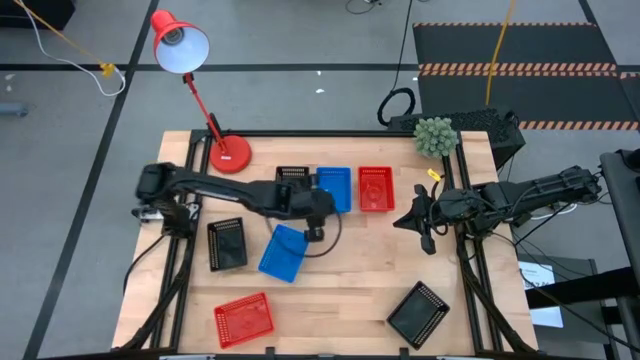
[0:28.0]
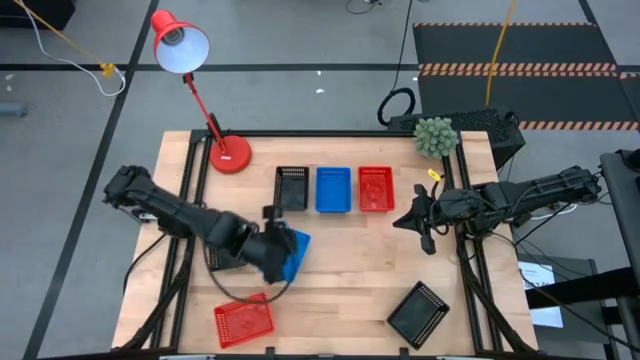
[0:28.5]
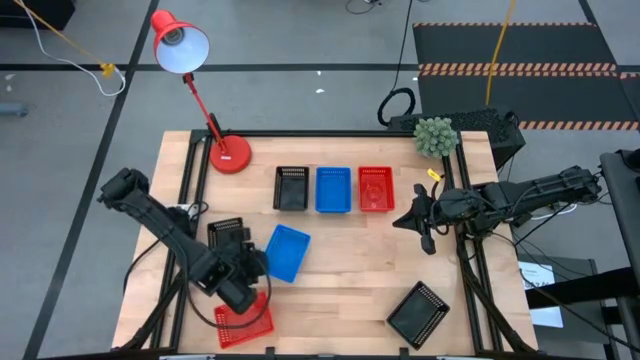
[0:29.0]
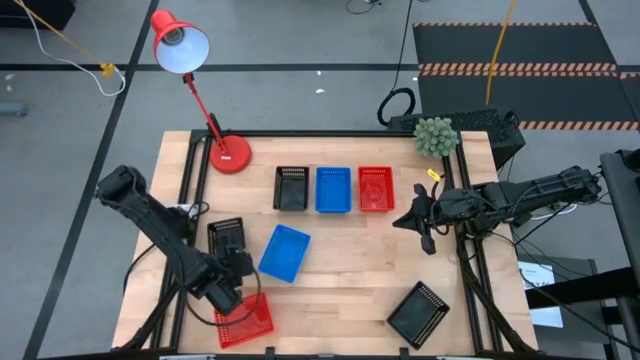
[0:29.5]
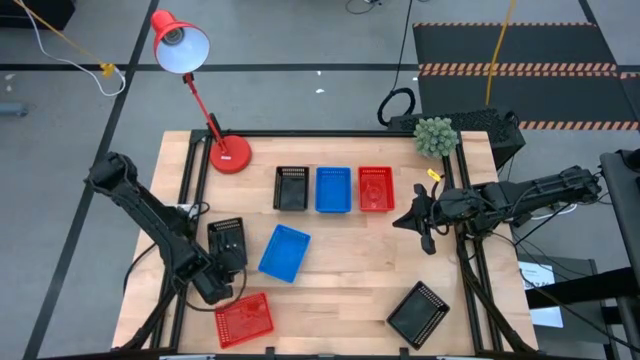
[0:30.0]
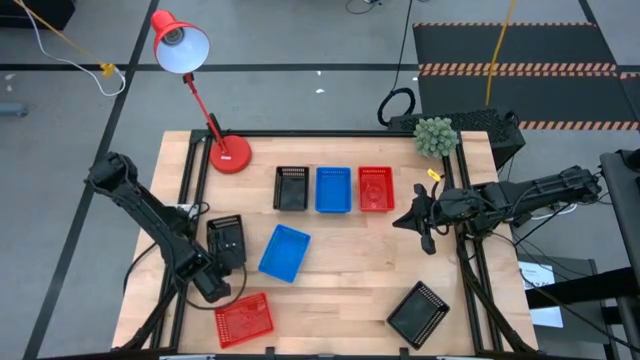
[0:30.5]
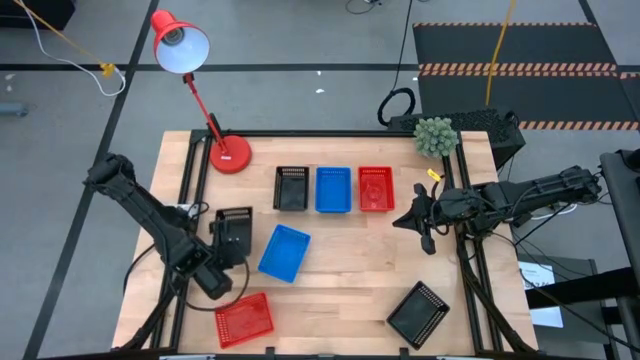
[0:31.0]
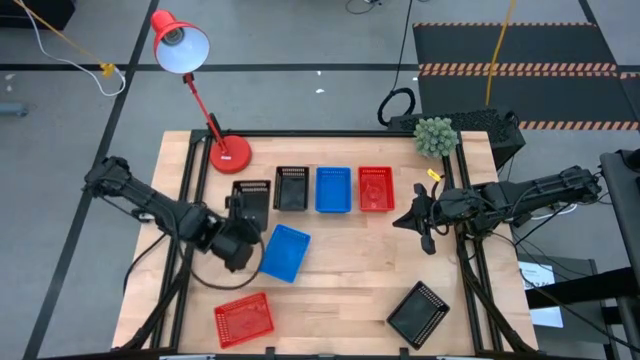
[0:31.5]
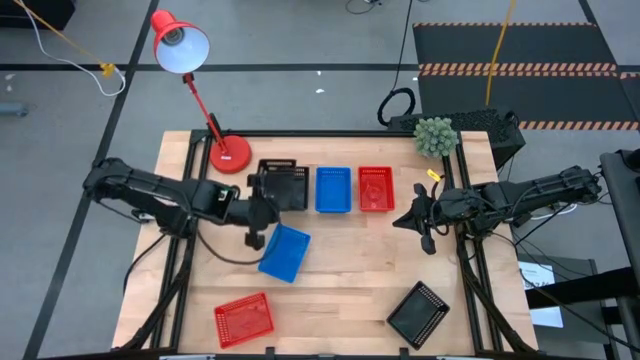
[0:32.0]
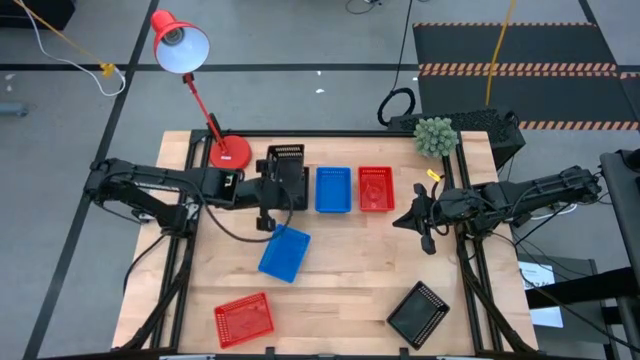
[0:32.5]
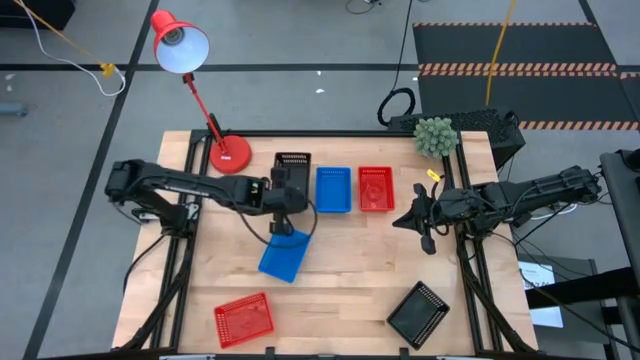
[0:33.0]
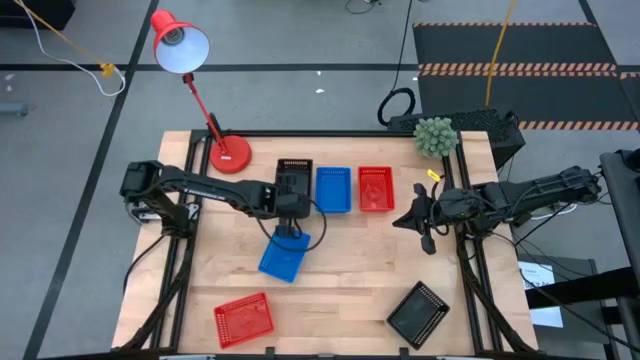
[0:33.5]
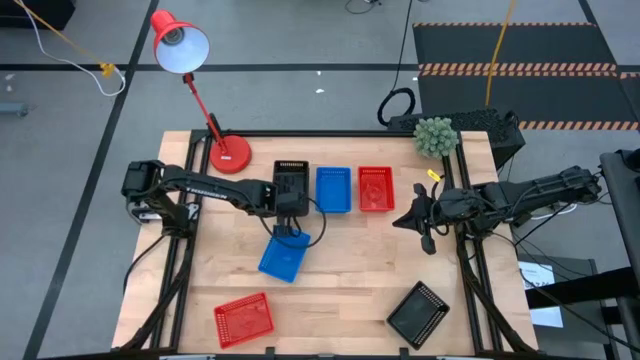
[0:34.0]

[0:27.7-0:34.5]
Stack the top black bin on the top black bin

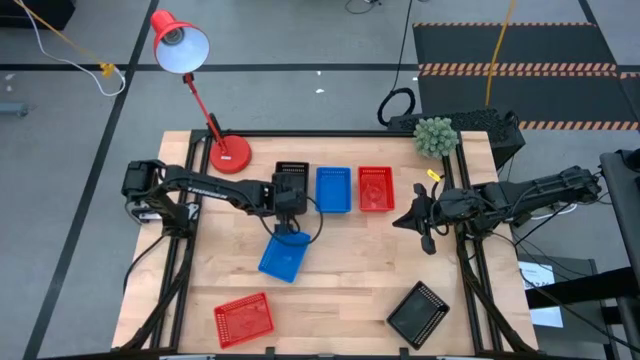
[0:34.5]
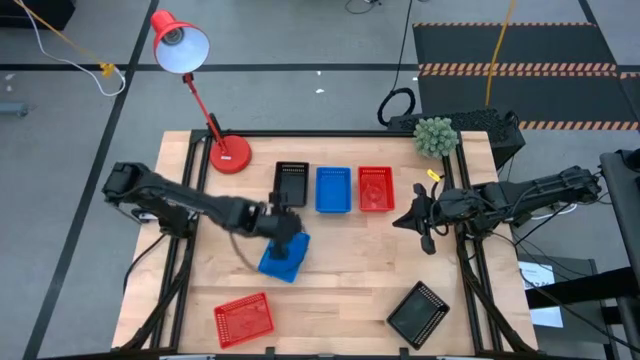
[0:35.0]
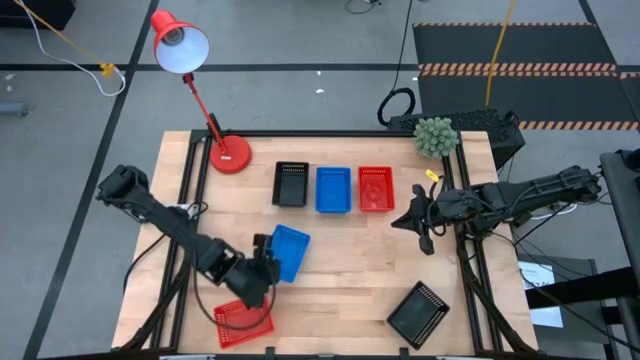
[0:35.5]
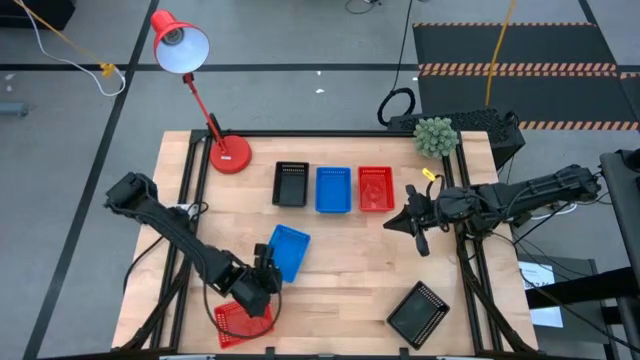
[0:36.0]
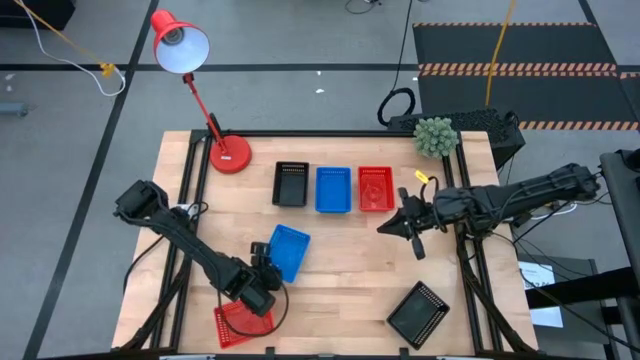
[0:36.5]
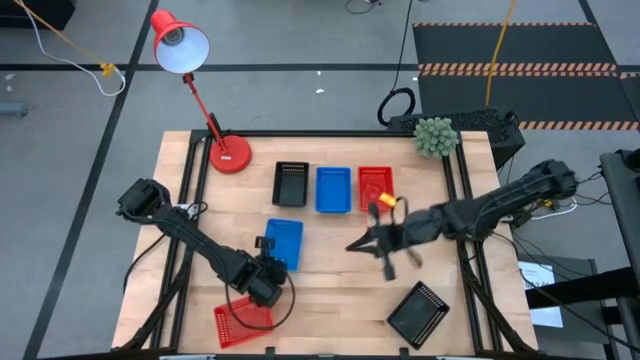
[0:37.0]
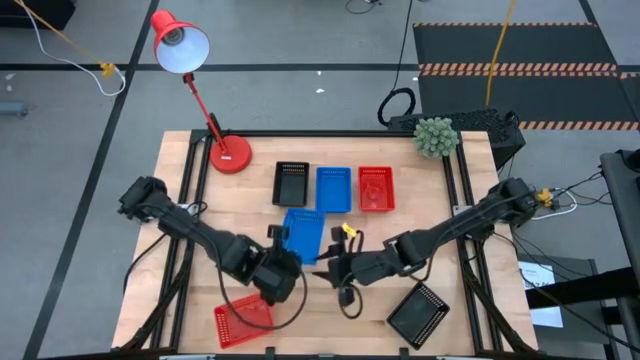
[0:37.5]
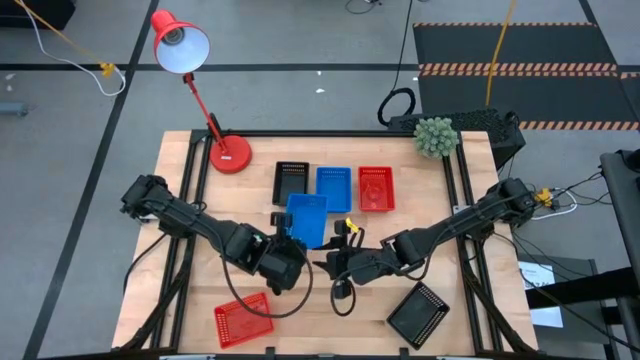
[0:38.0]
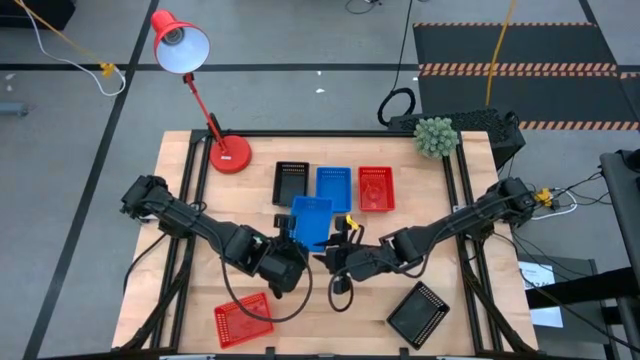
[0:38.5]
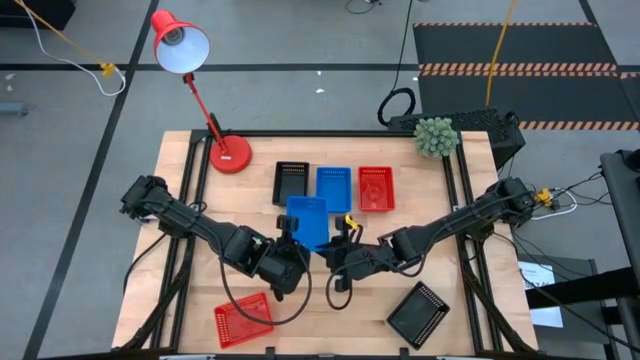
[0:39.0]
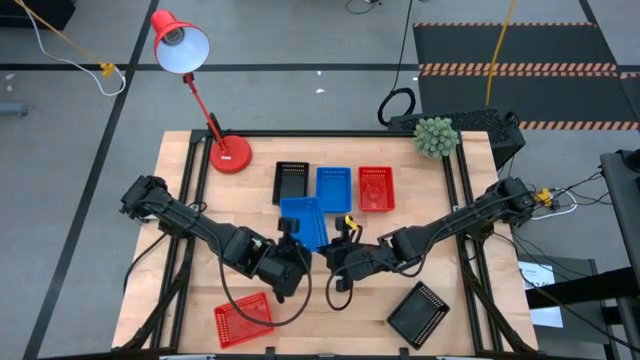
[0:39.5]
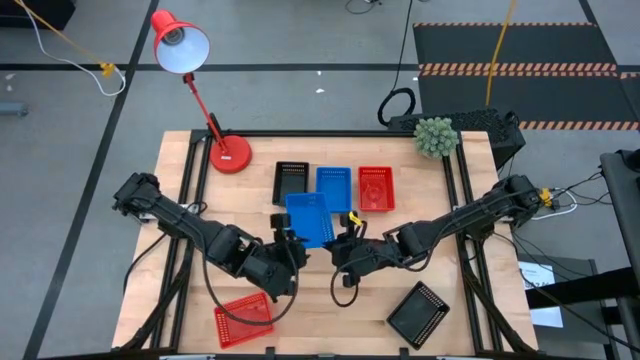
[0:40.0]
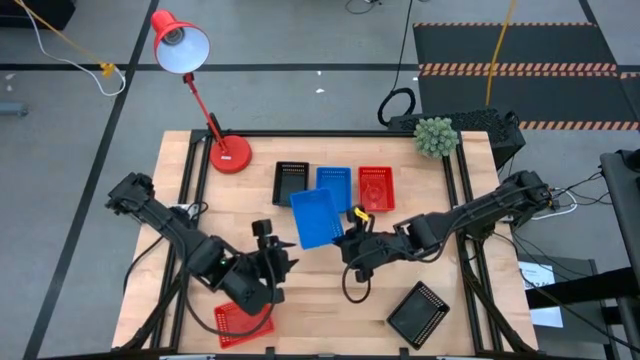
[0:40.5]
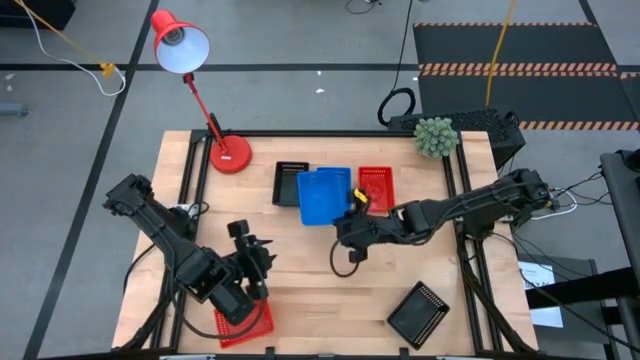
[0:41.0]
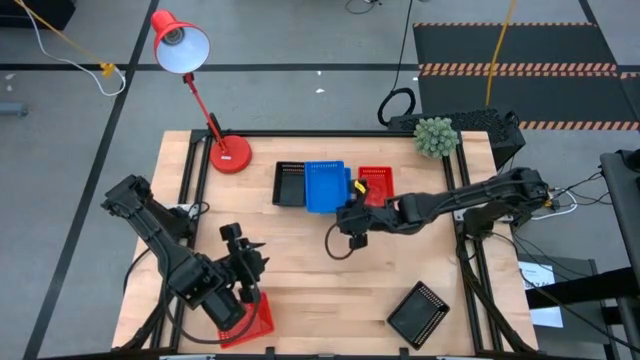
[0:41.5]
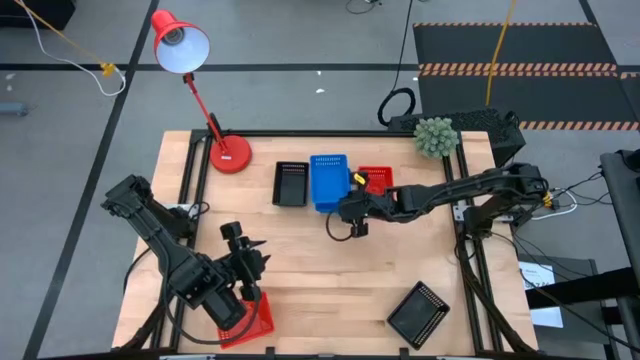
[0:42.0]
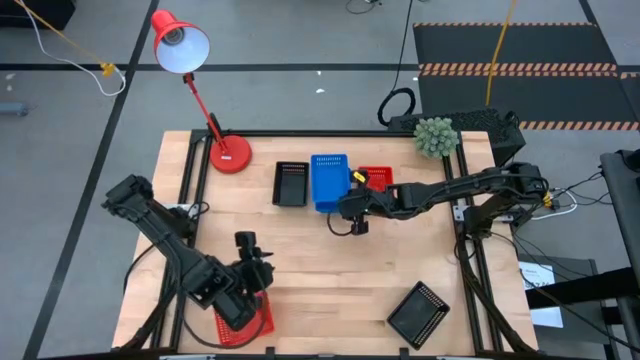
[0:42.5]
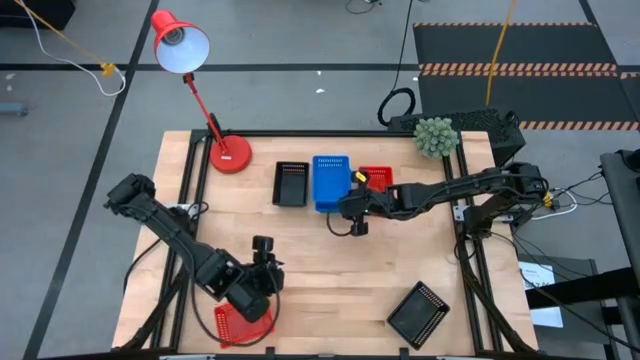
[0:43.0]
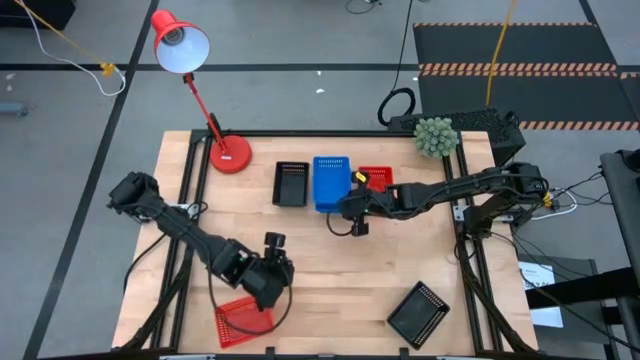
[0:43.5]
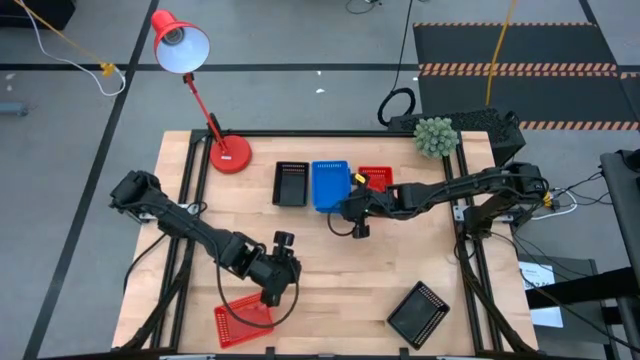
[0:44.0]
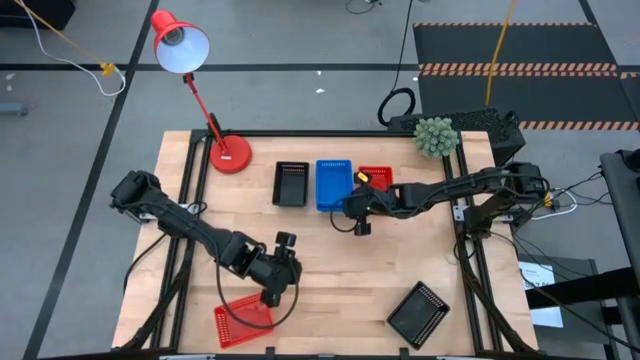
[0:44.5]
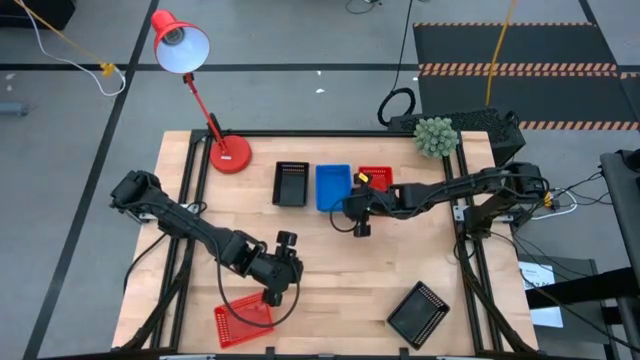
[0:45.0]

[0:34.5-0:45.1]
Stack the blue bin on the stacked blue bins
